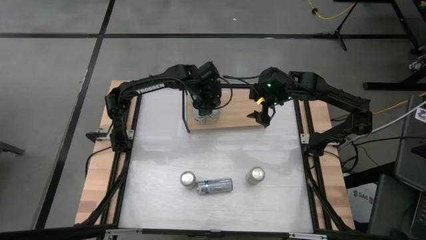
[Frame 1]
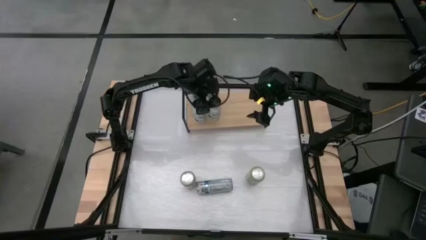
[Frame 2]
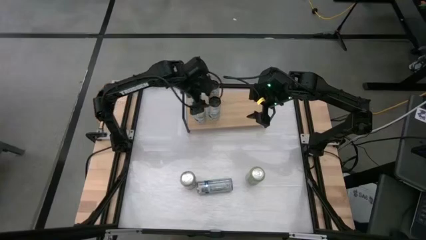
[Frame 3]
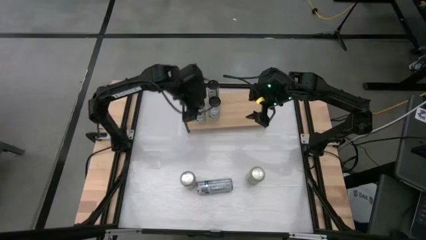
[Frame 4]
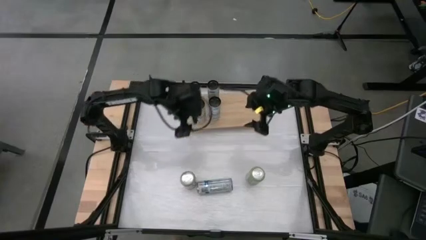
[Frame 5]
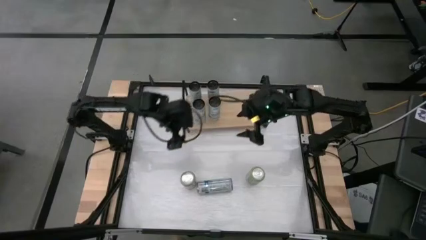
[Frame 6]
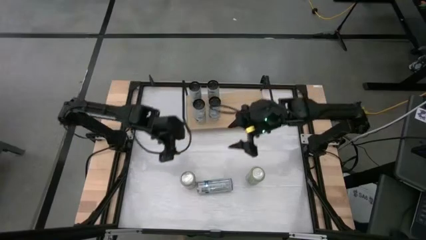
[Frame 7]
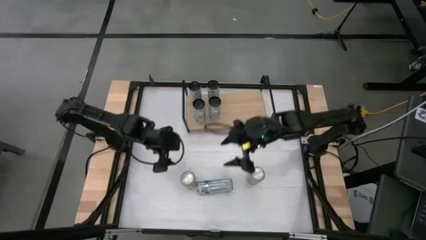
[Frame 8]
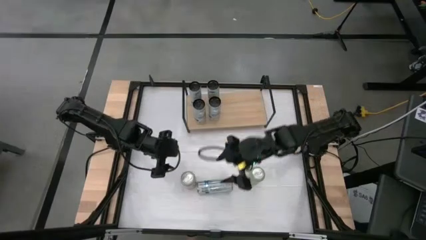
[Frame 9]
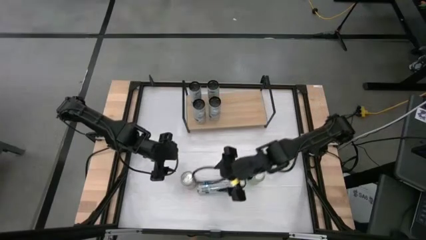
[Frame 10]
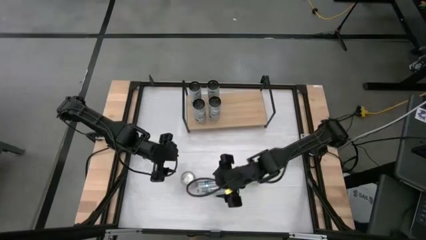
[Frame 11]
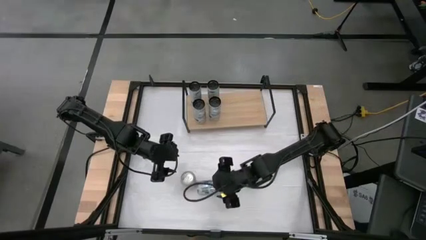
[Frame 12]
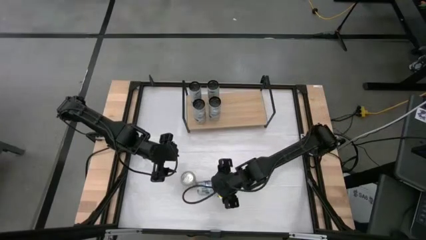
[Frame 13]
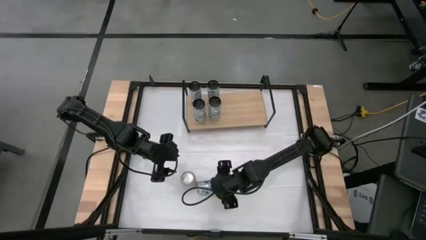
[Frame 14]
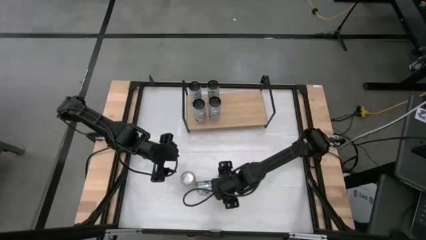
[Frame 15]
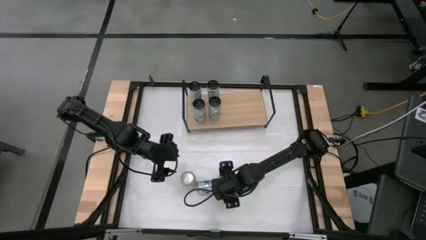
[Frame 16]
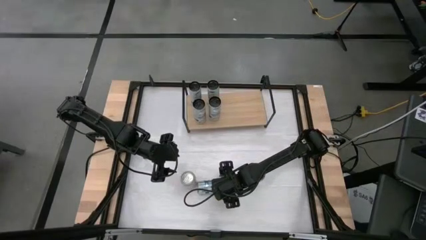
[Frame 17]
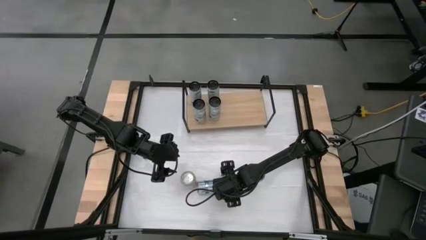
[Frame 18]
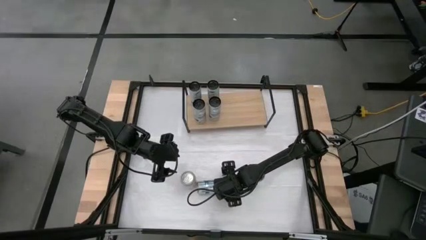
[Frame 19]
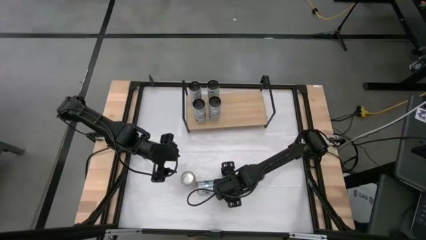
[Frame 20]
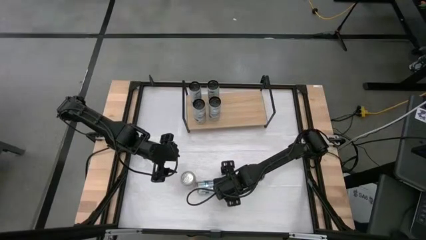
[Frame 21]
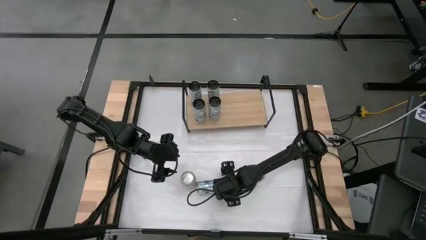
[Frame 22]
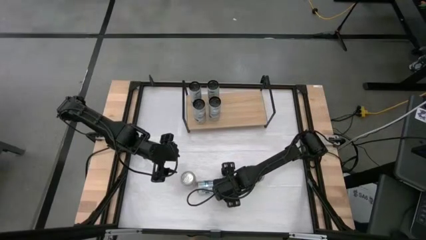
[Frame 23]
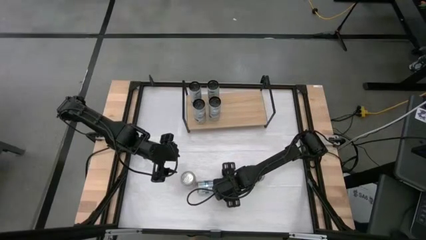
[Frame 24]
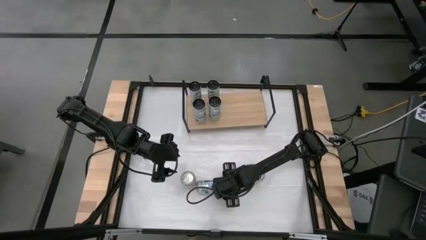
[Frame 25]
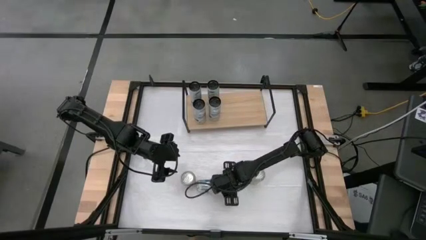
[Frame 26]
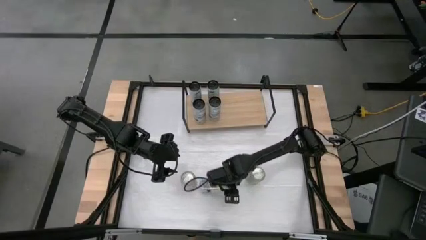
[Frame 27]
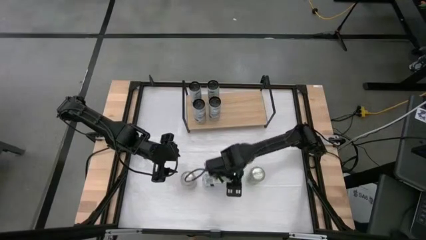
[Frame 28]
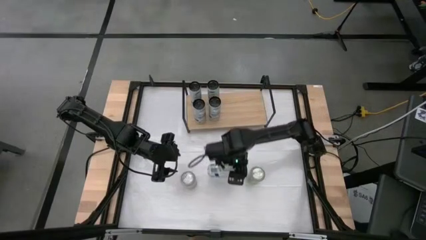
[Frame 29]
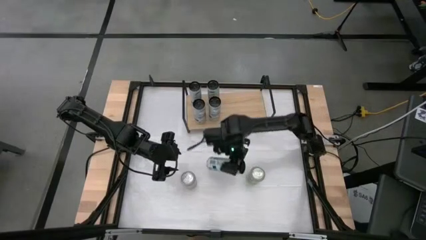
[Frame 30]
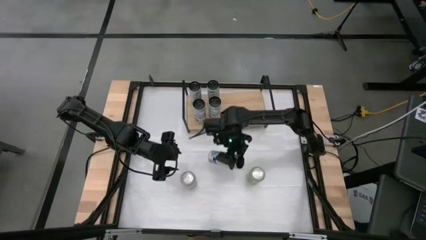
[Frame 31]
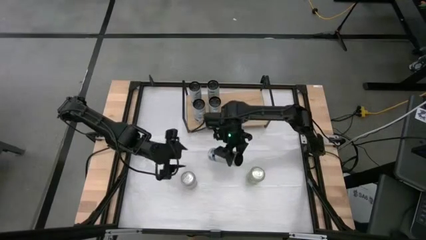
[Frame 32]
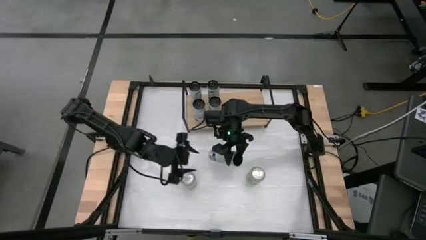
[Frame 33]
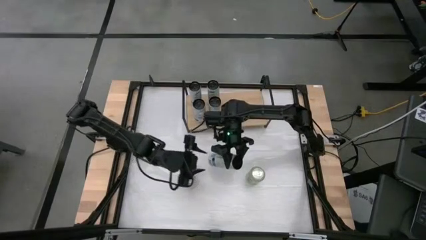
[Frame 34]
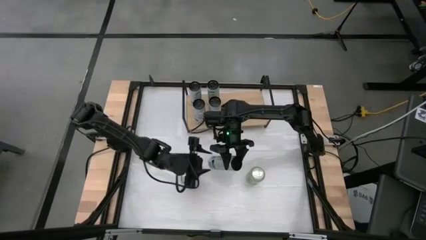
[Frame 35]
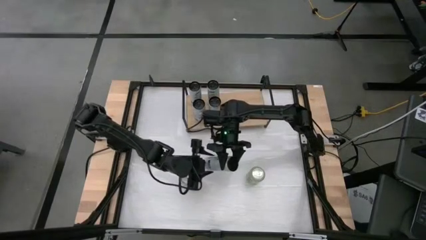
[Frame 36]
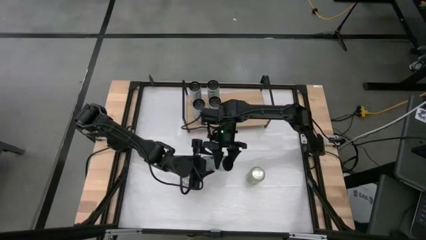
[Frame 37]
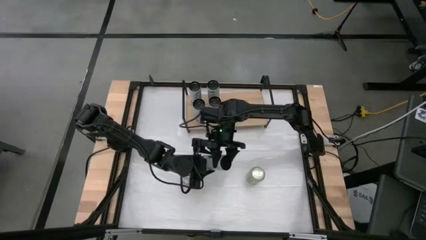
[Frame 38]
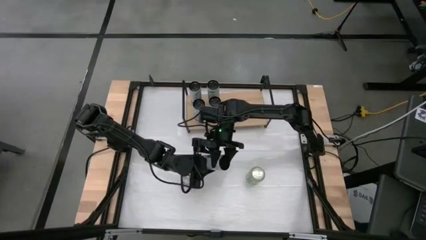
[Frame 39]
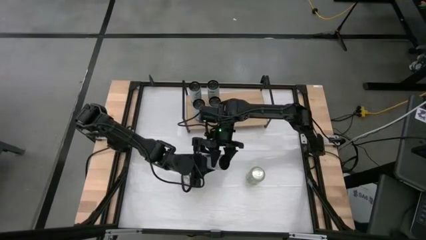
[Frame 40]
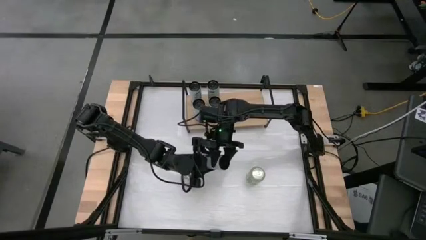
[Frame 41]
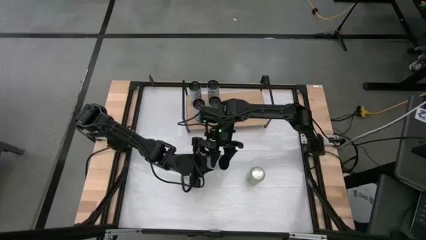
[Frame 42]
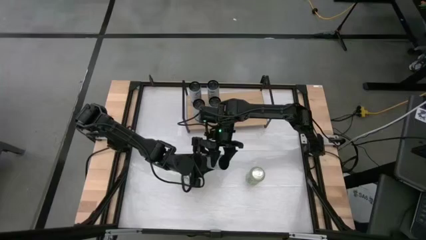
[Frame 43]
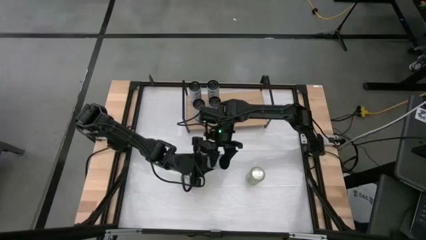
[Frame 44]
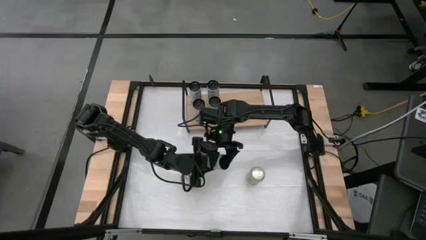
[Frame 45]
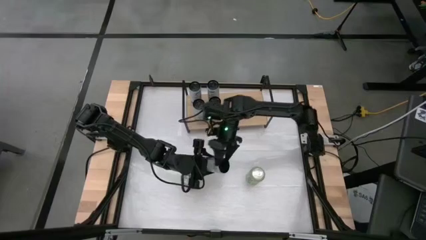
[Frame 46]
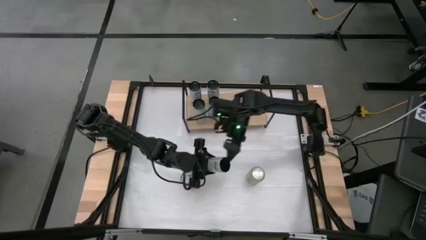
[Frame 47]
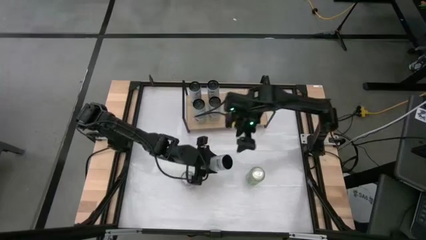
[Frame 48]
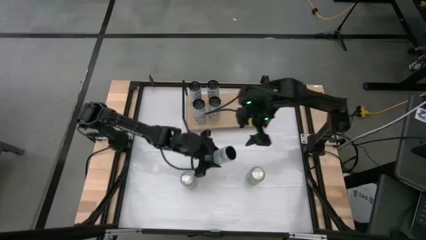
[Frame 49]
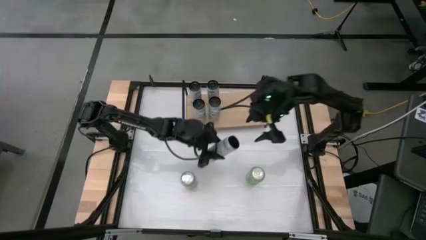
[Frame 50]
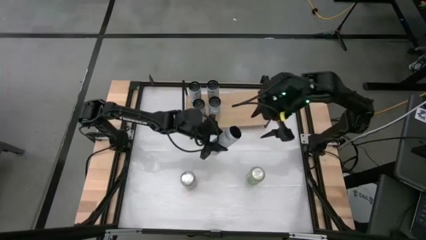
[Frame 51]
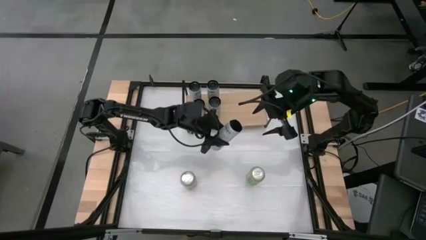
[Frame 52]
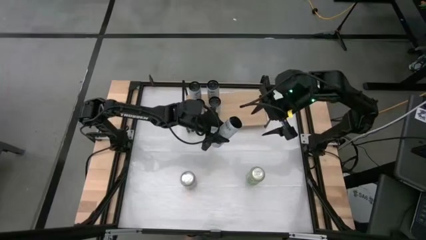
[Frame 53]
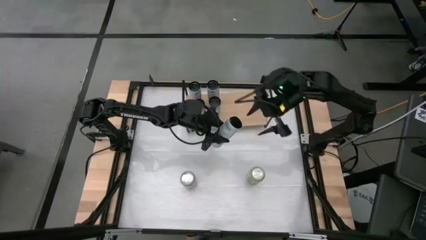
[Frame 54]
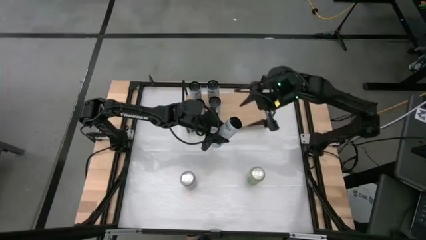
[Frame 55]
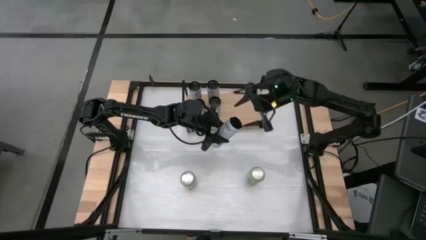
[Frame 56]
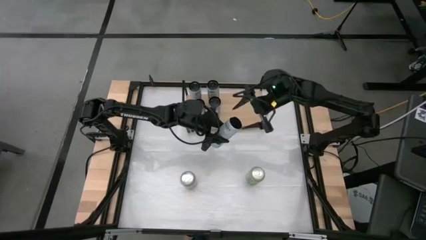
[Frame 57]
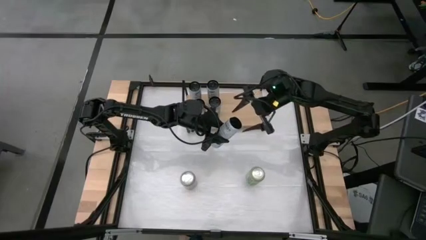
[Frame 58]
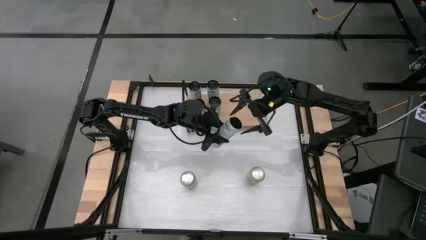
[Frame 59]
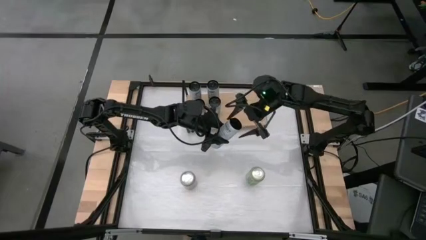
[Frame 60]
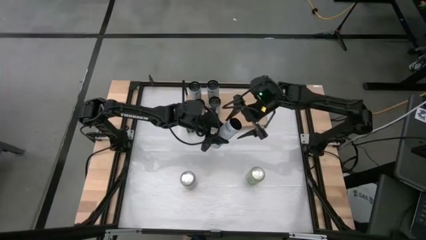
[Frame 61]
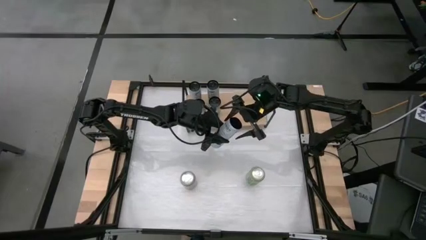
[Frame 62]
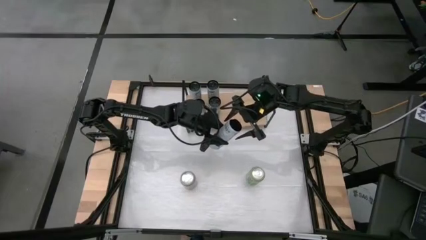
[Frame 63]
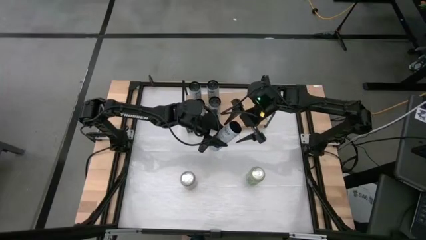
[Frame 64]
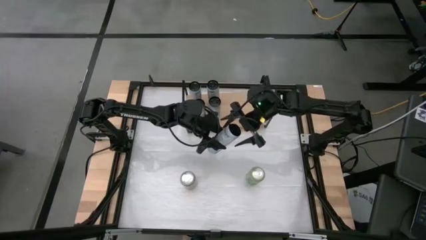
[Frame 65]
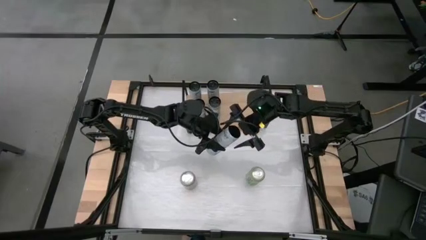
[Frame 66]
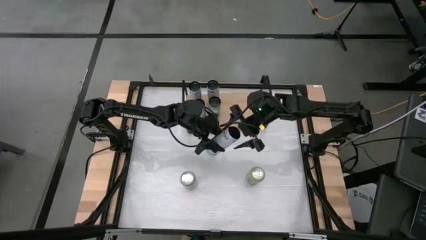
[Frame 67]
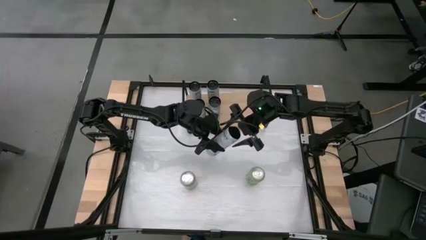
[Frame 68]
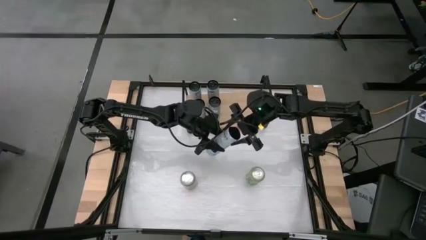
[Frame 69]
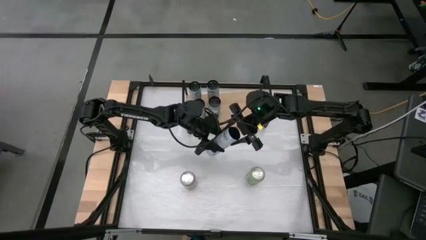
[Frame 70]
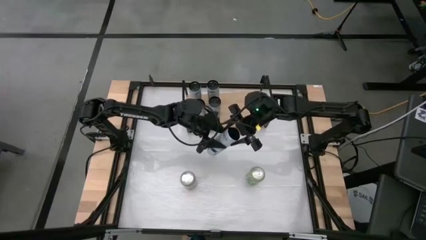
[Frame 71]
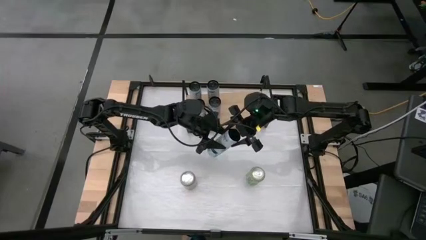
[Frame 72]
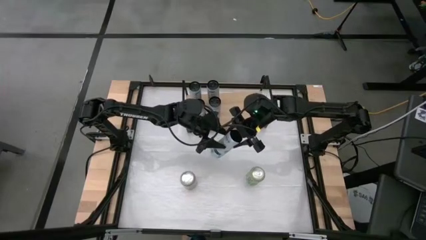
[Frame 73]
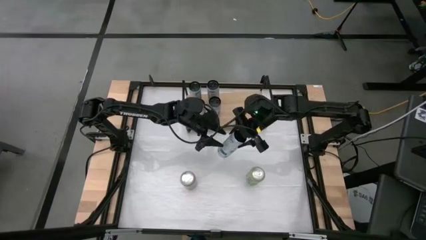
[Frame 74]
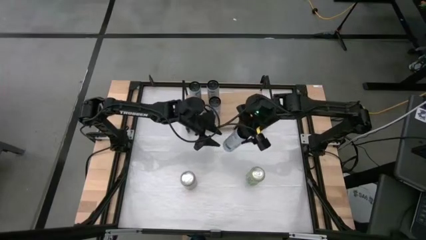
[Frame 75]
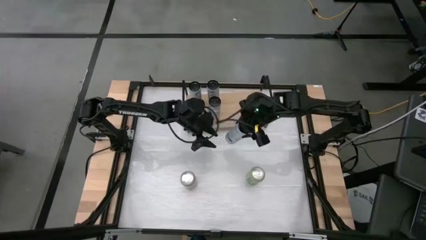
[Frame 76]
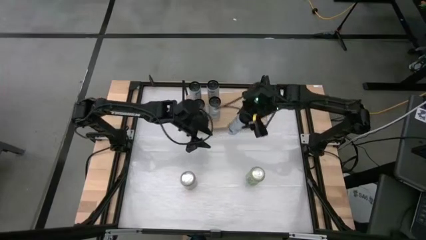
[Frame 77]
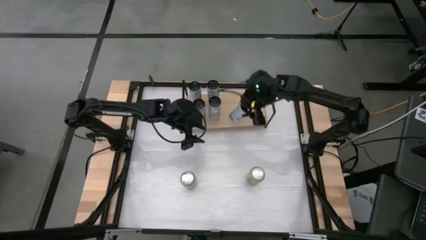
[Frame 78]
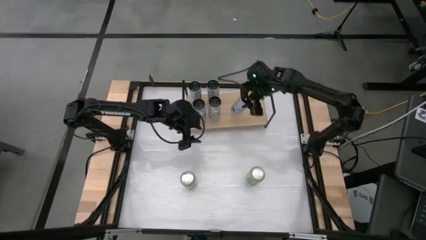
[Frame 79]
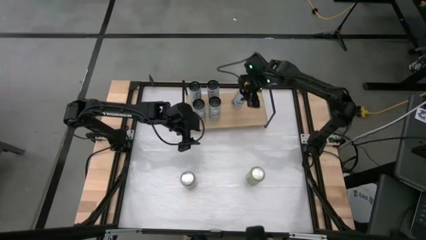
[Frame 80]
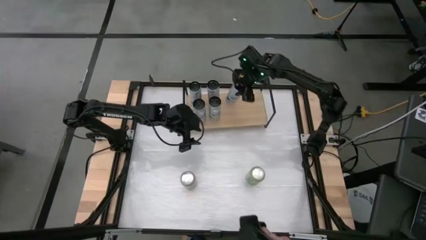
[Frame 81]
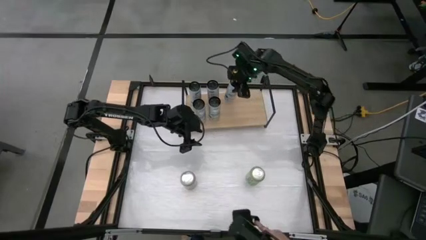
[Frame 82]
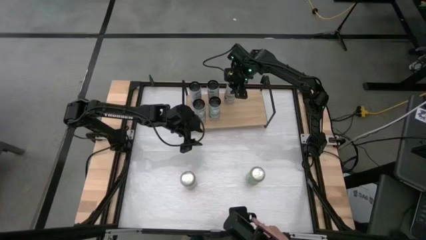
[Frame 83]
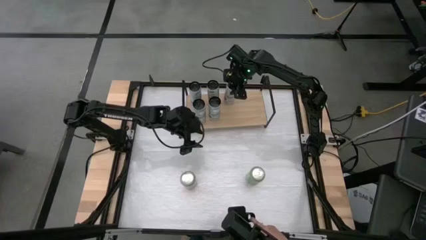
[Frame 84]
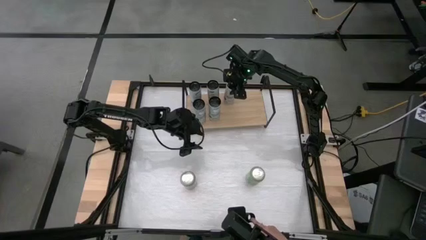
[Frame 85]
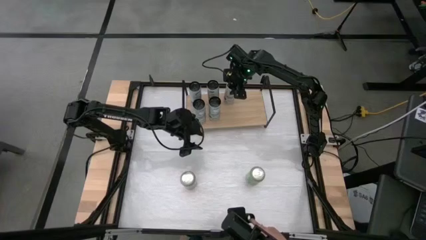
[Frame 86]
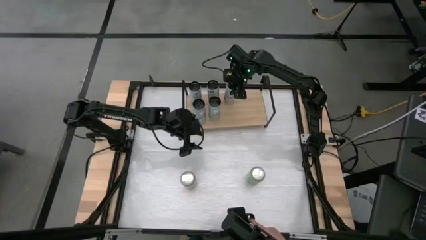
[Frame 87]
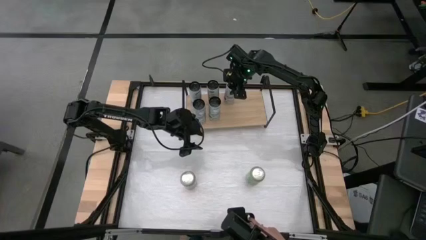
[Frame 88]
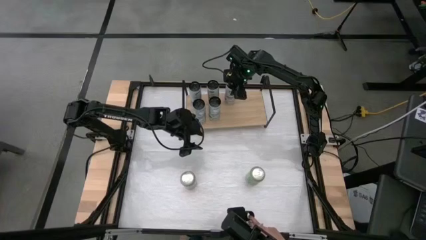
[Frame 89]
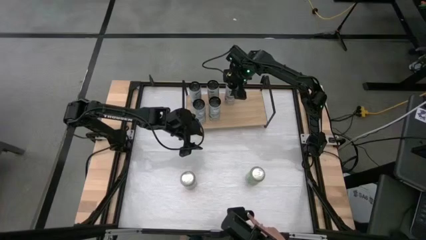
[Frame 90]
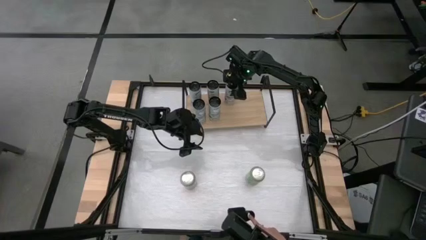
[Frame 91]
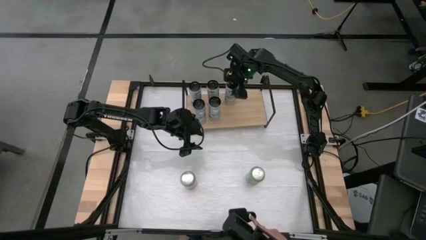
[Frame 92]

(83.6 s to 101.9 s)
Task: Place canned beverage on shelf
Put the white-blue soda can on the shelf
